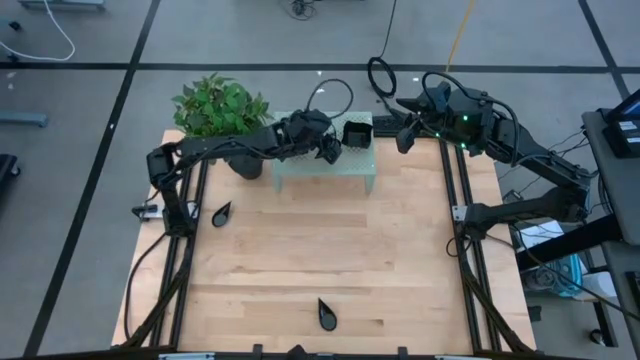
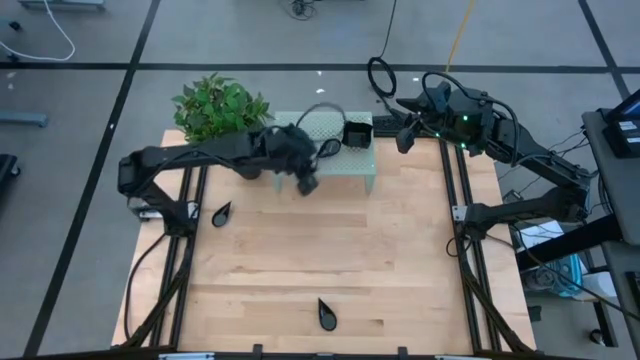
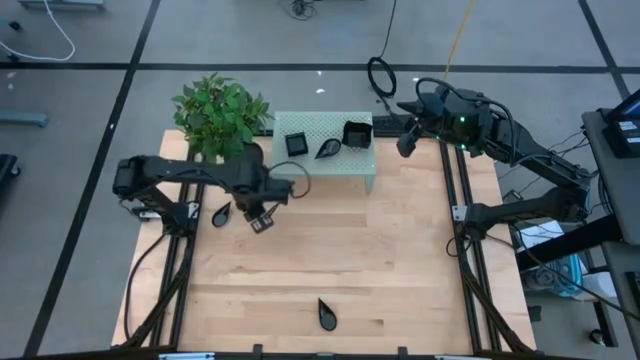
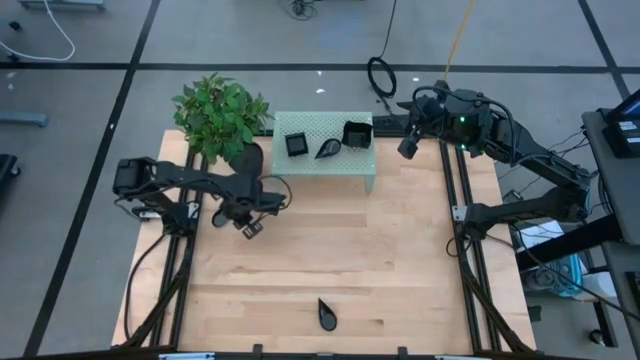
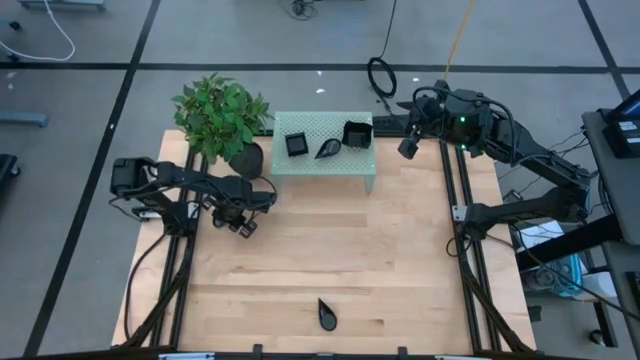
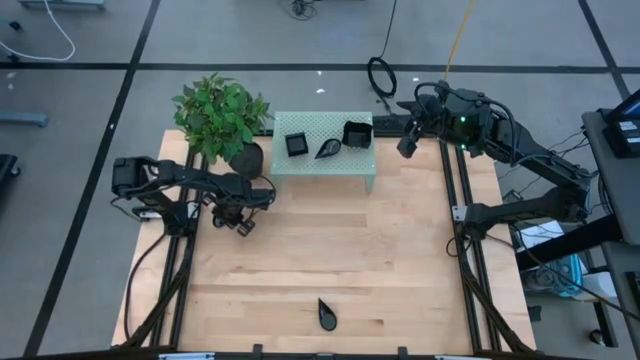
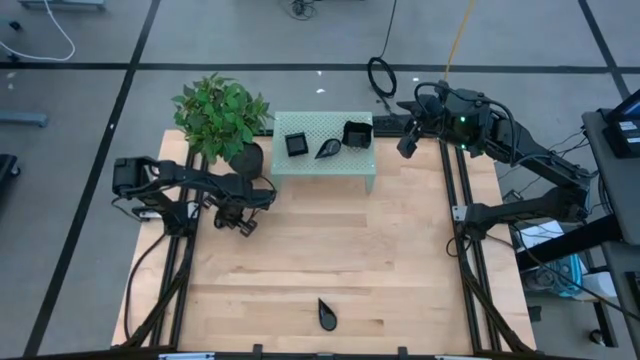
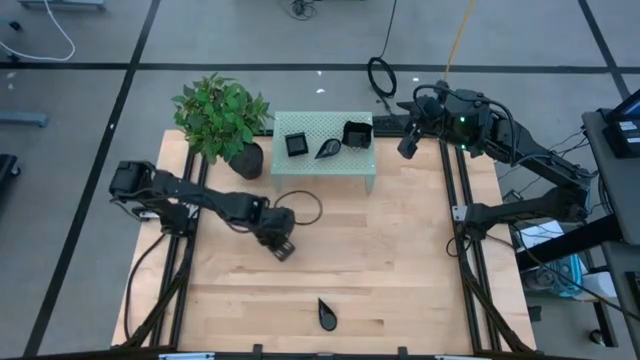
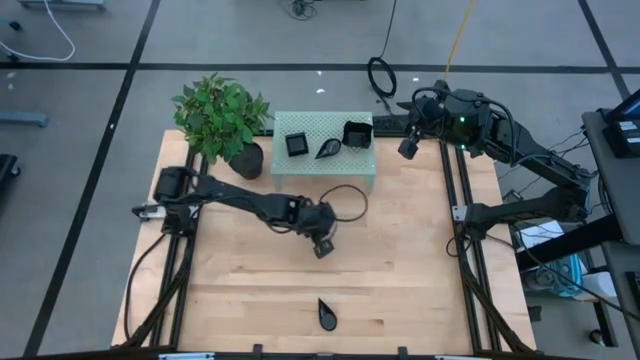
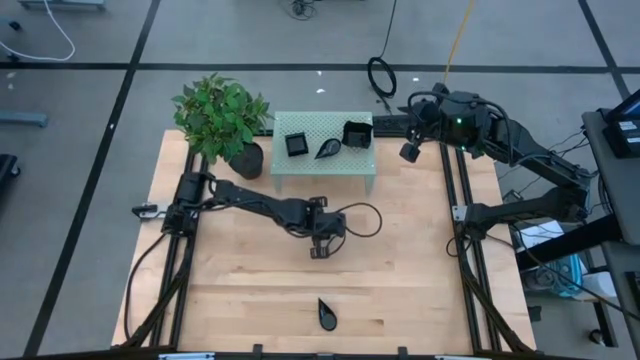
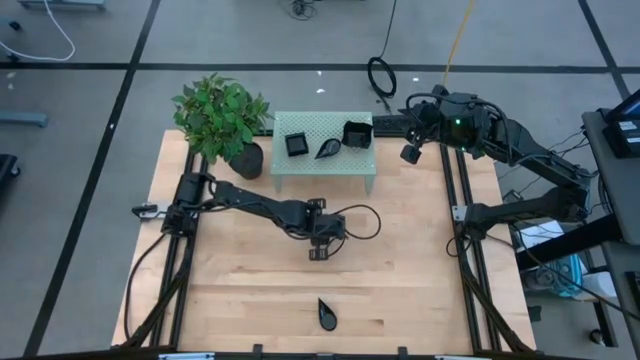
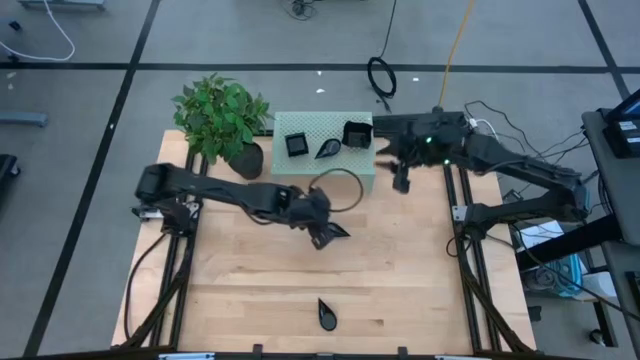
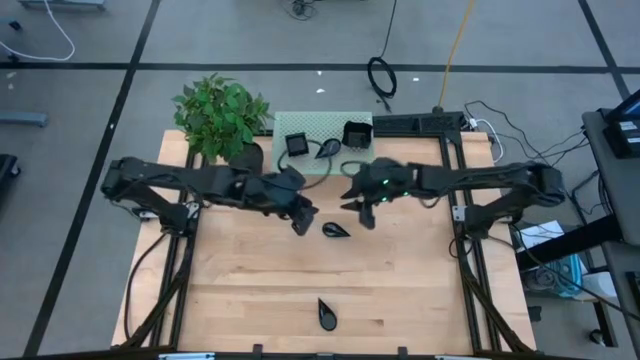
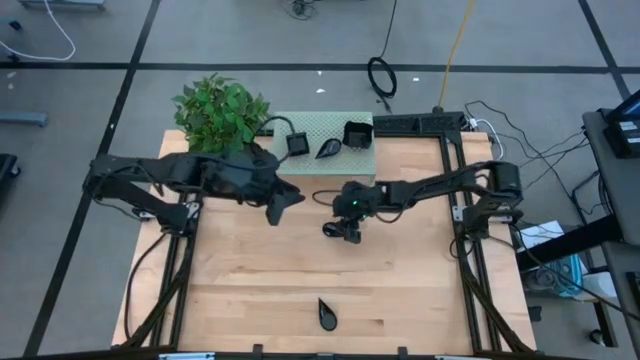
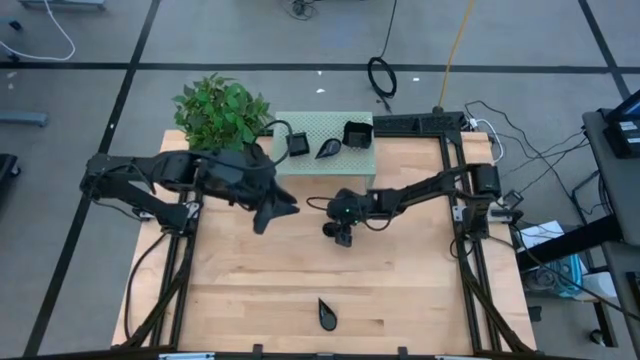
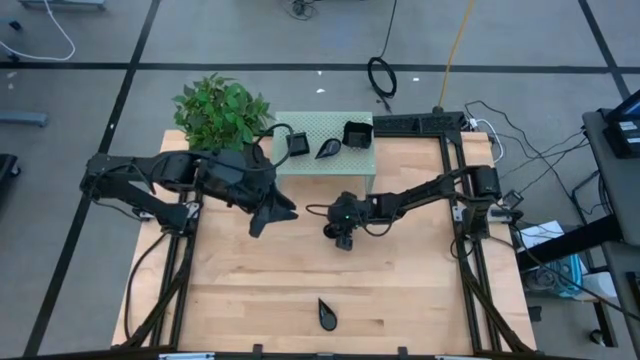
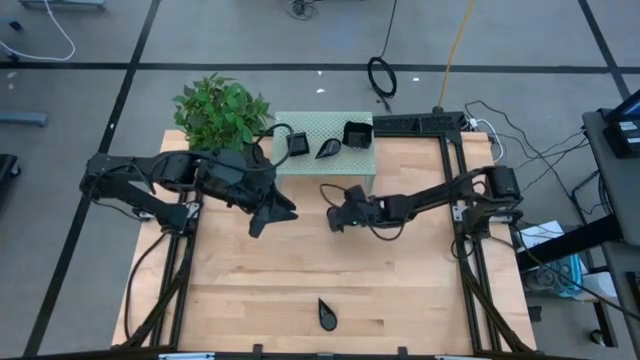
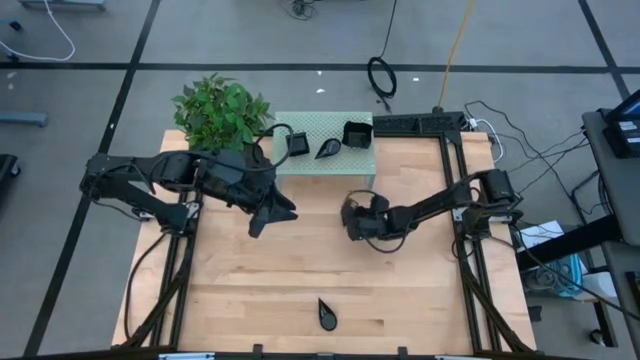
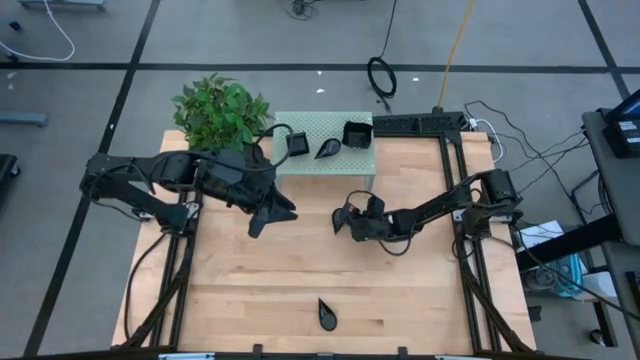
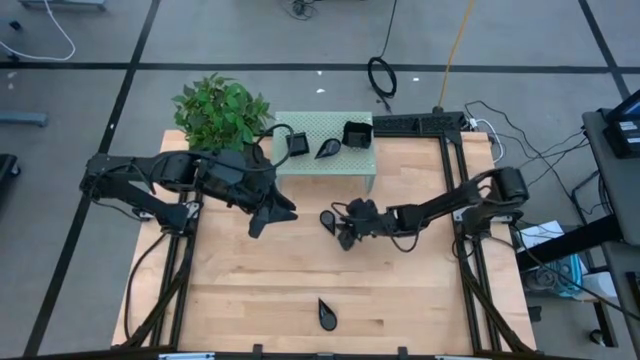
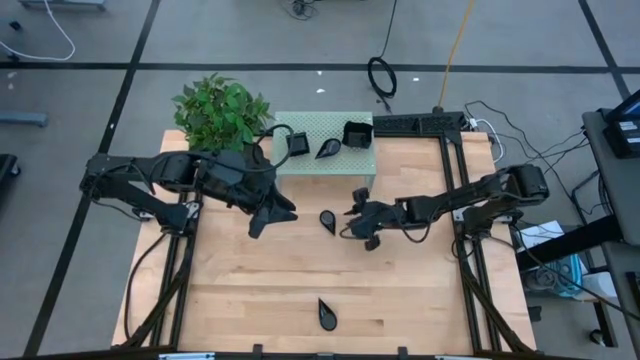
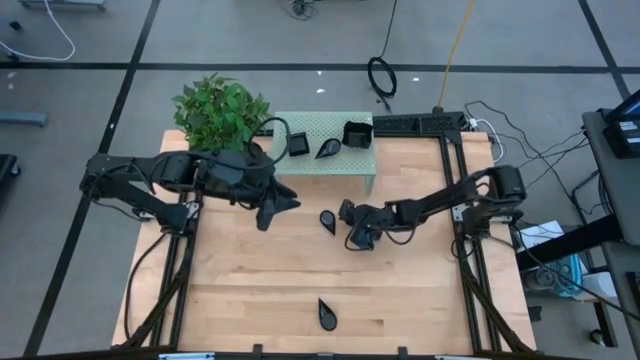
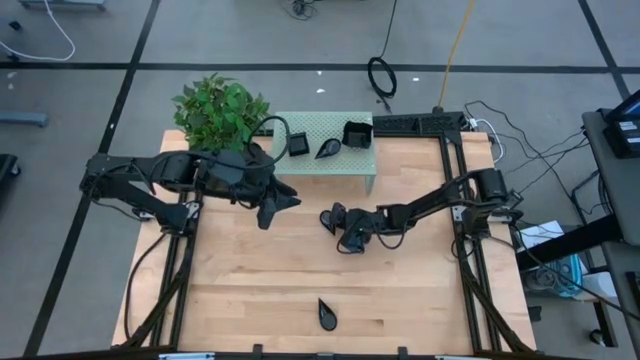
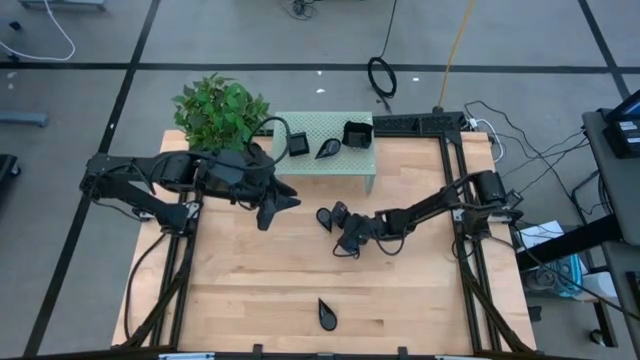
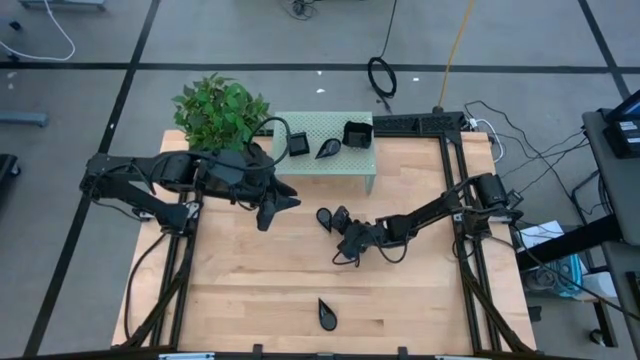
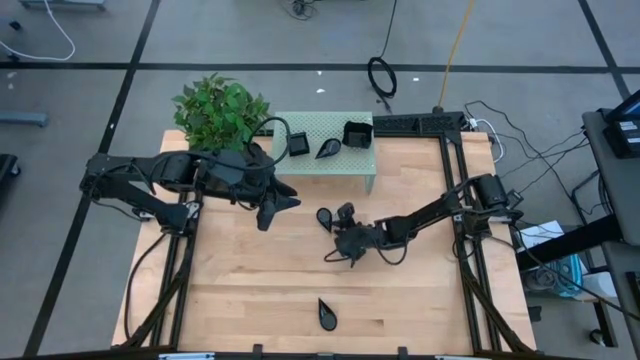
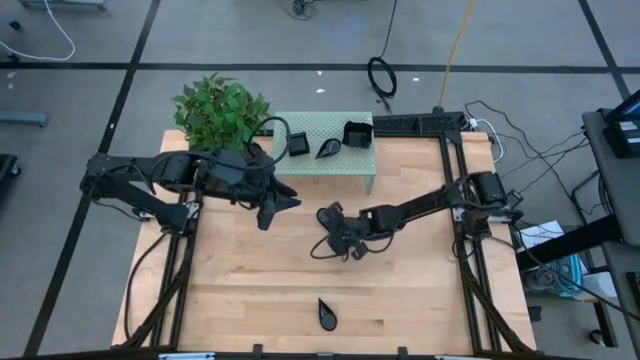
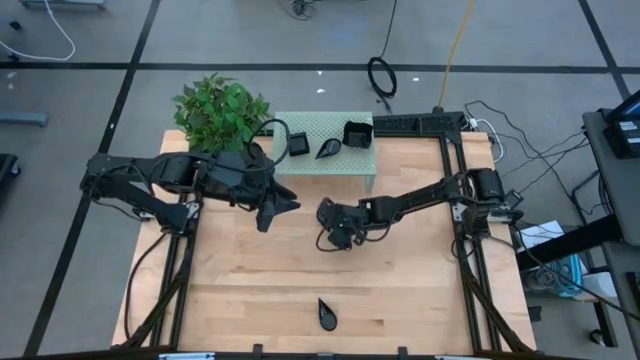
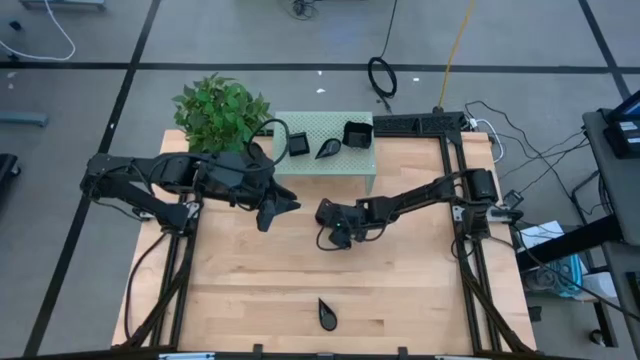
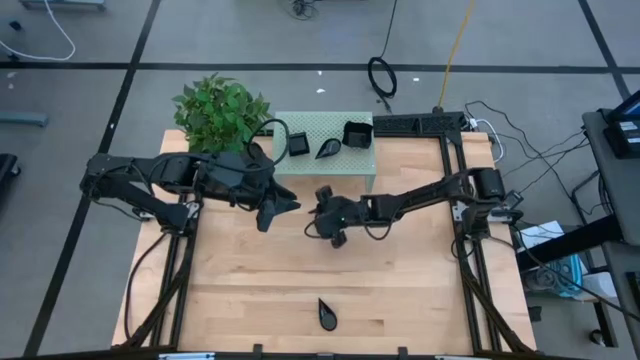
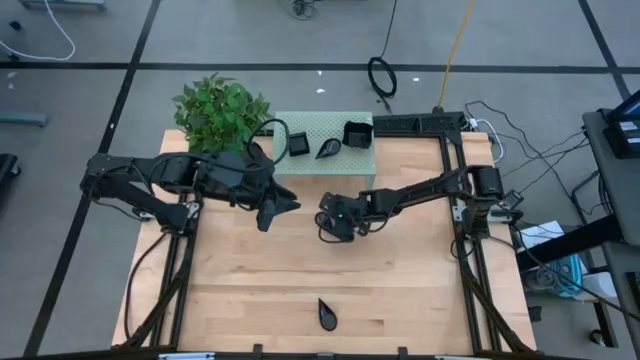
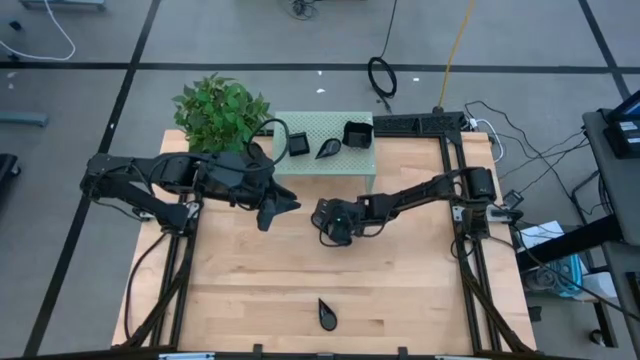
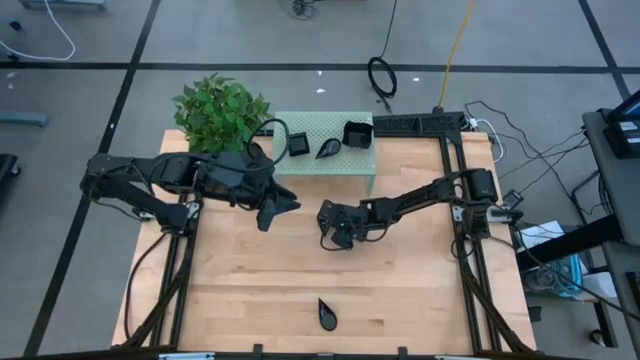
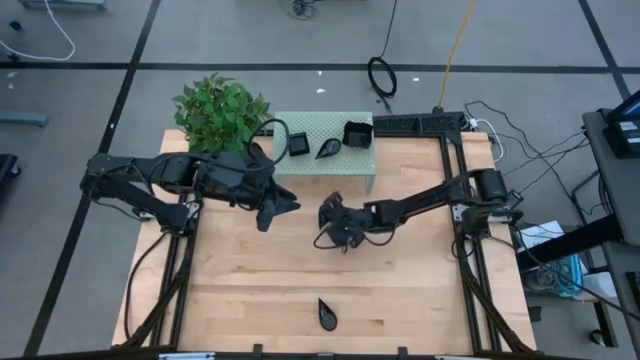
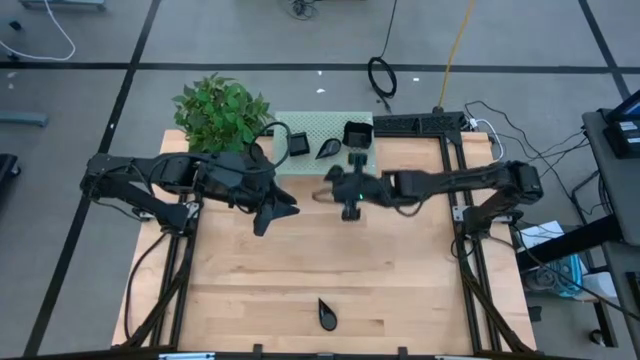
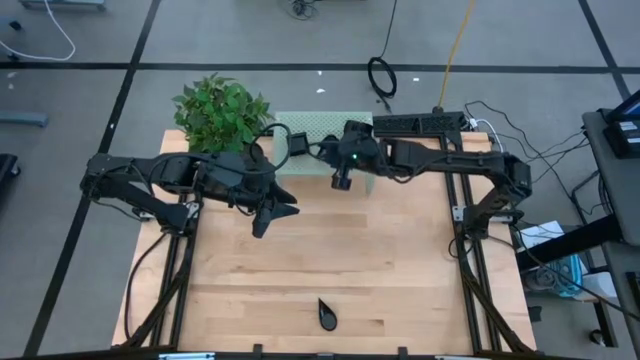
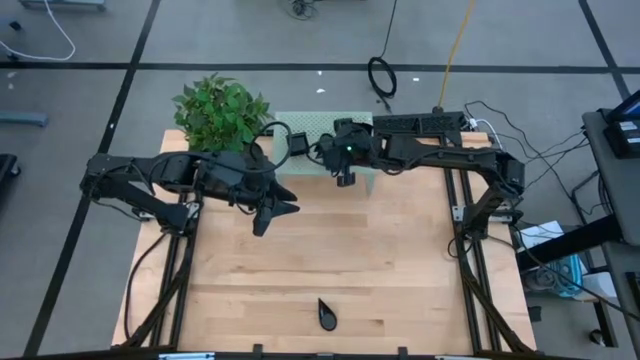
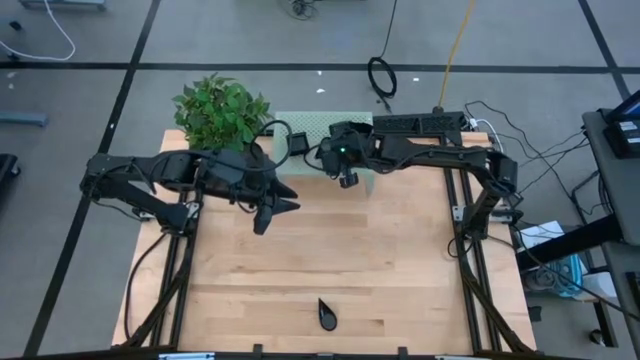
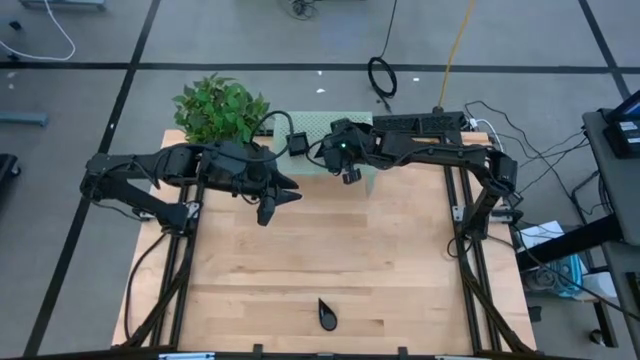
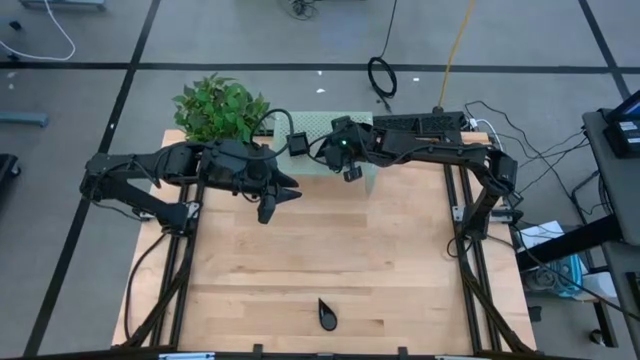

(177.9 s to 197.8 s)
Task: Pick & Place Mini shaped plates
Stack the drop shaped plate on top of the other drop shaped plate on the shelf

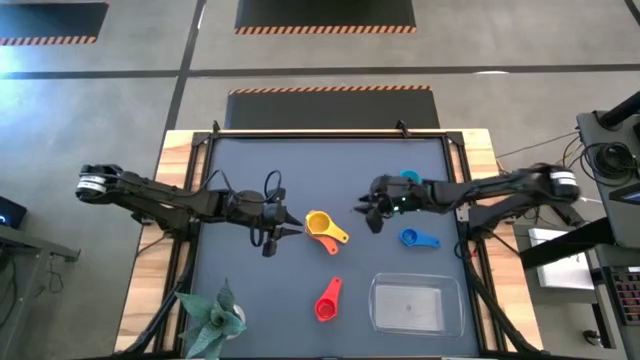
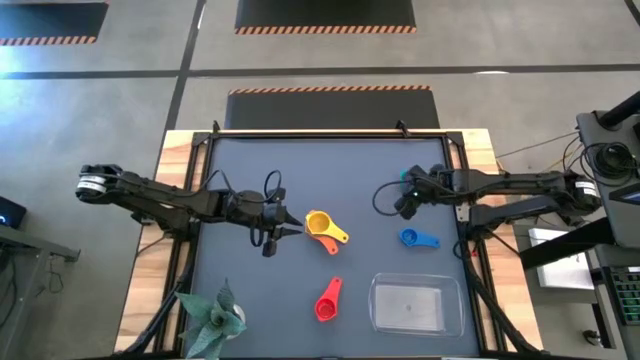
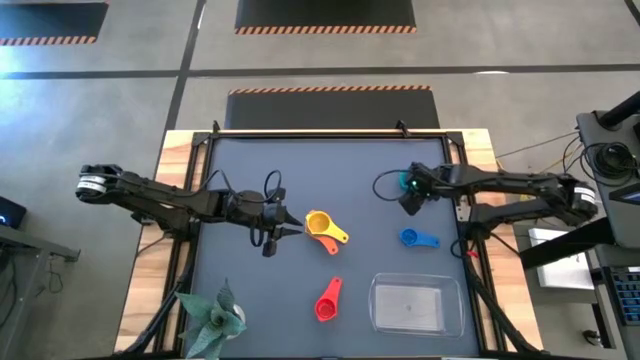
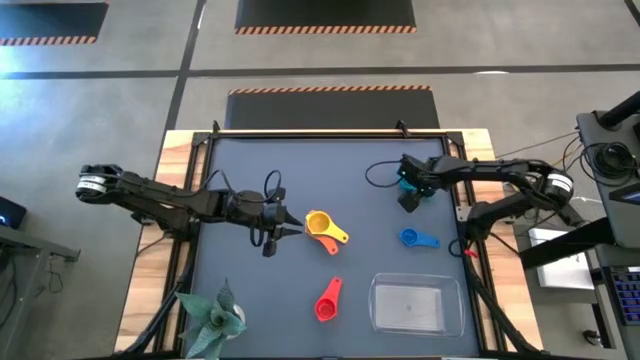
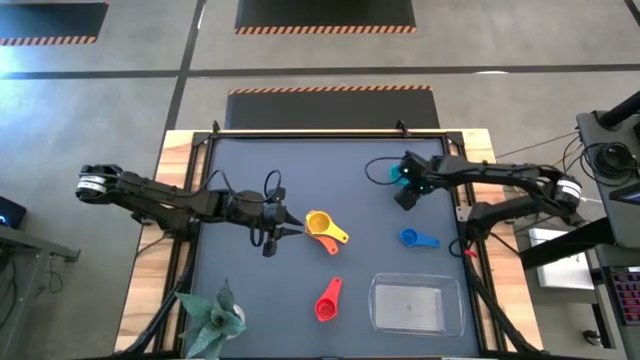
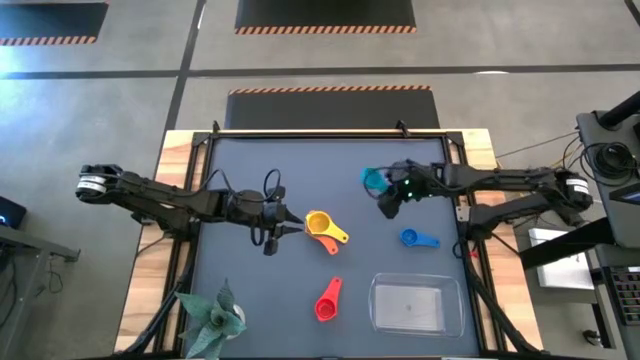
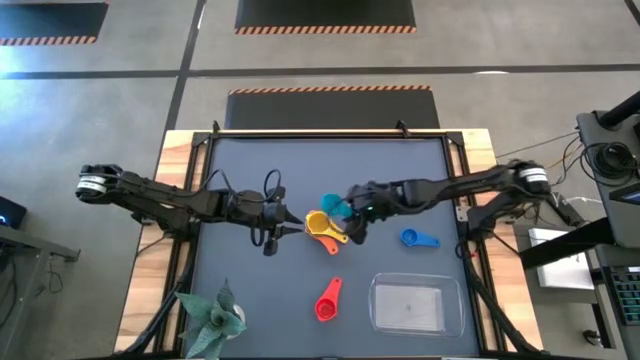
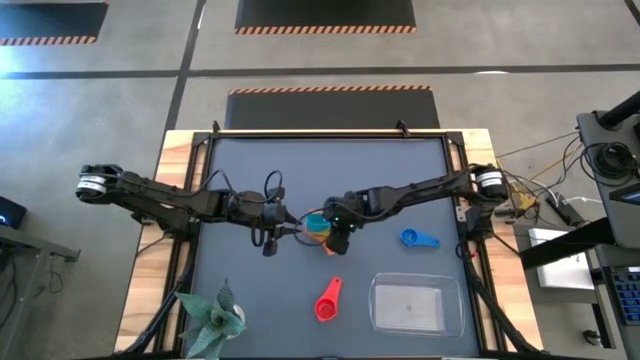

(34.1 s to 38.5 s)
Task: Nest measuring cups in basket
Stack the light blue measuring cup on top of the yellow measuring cup
